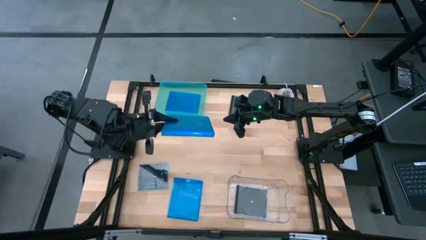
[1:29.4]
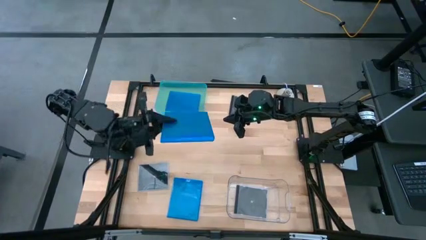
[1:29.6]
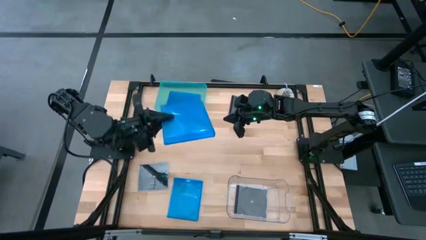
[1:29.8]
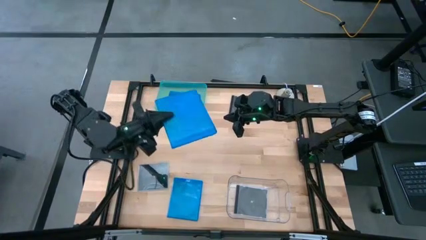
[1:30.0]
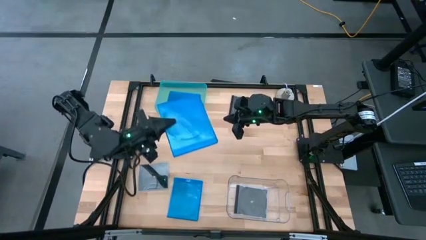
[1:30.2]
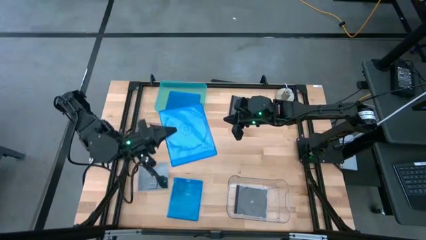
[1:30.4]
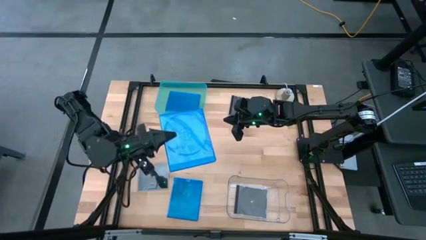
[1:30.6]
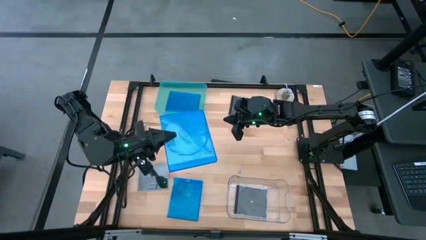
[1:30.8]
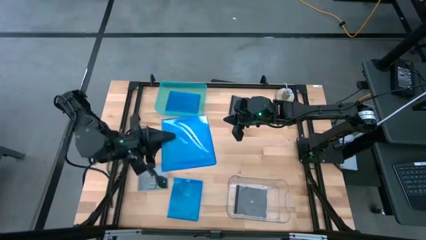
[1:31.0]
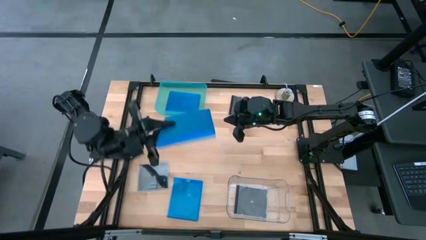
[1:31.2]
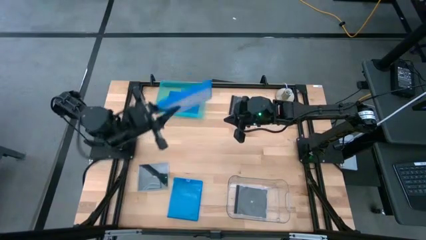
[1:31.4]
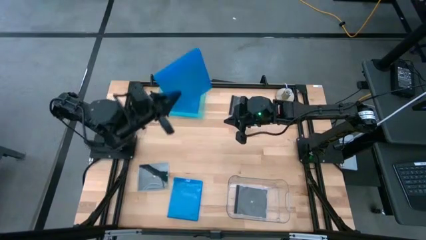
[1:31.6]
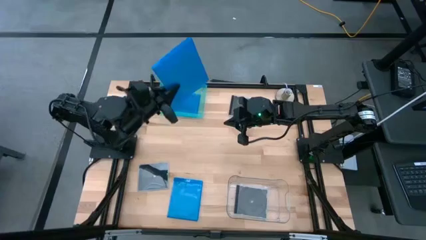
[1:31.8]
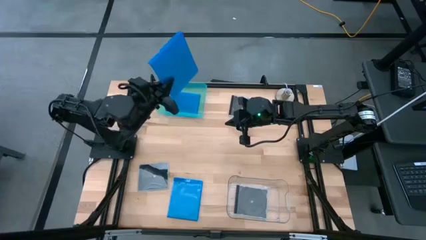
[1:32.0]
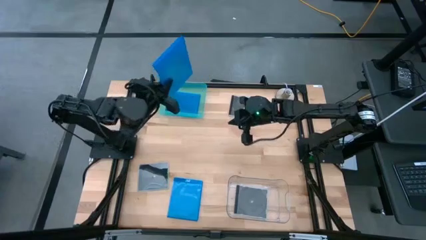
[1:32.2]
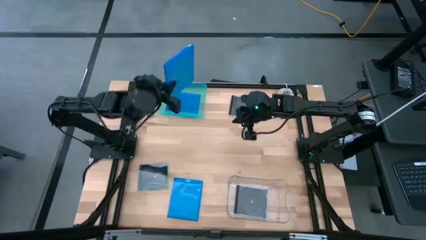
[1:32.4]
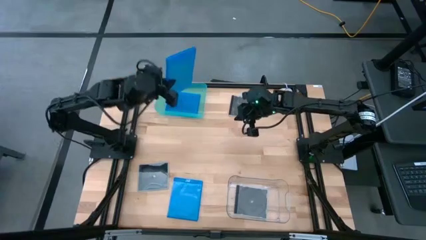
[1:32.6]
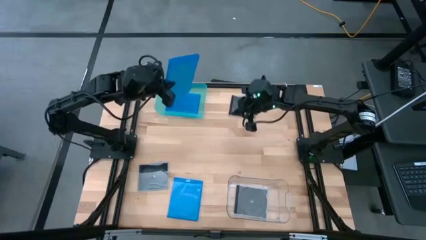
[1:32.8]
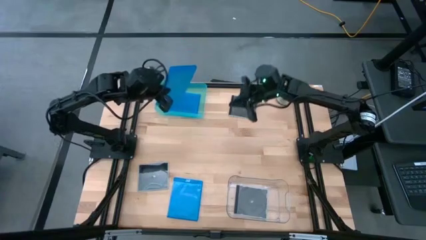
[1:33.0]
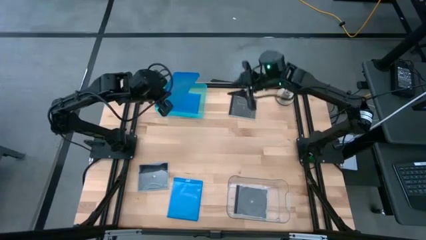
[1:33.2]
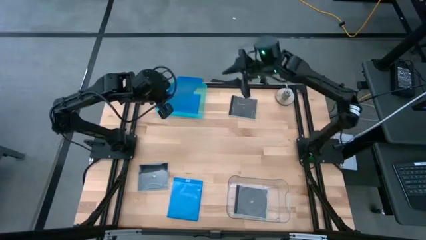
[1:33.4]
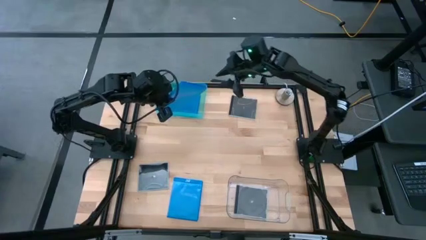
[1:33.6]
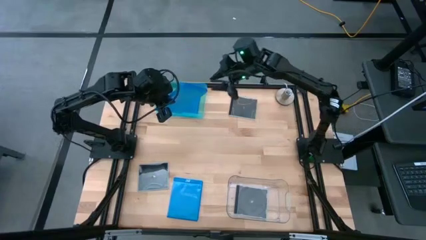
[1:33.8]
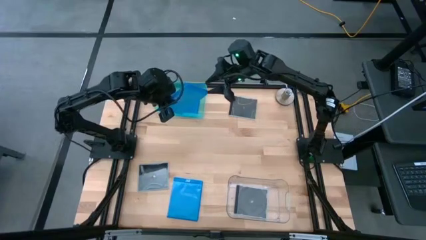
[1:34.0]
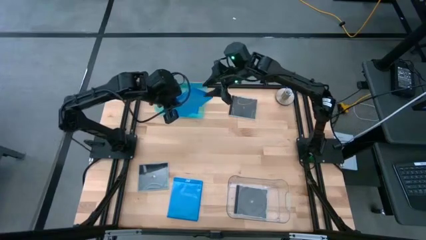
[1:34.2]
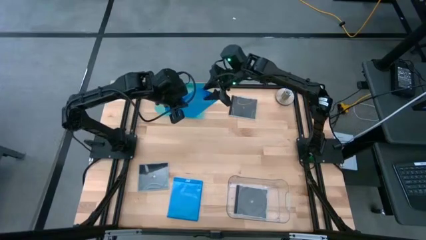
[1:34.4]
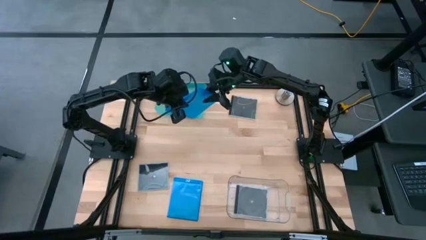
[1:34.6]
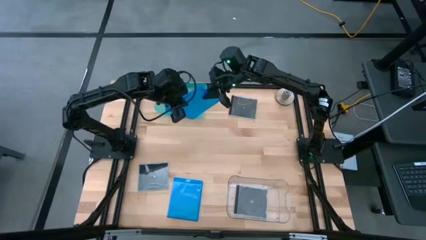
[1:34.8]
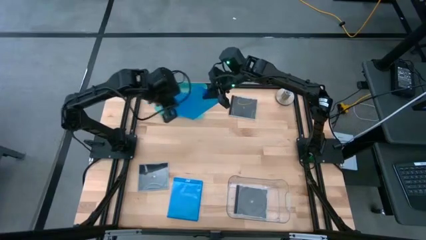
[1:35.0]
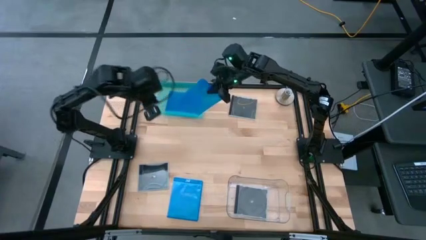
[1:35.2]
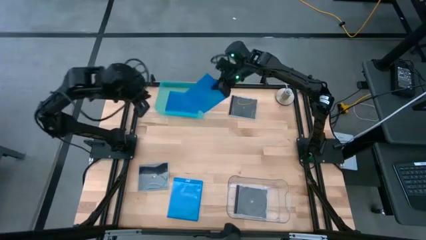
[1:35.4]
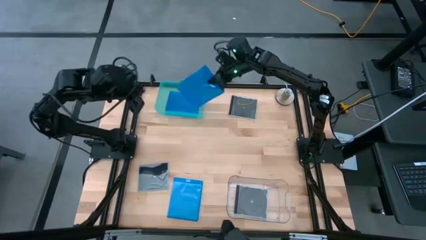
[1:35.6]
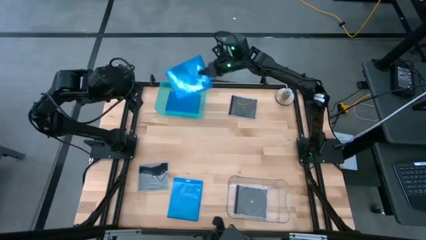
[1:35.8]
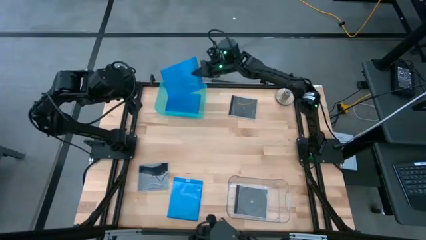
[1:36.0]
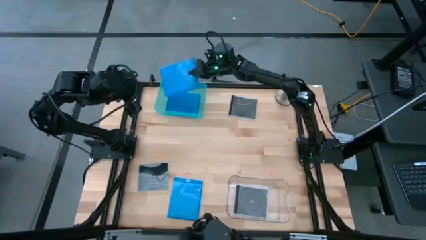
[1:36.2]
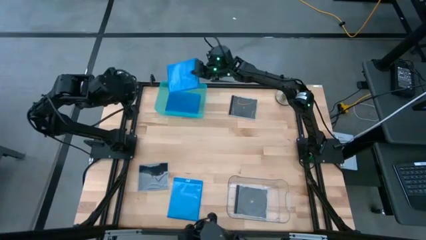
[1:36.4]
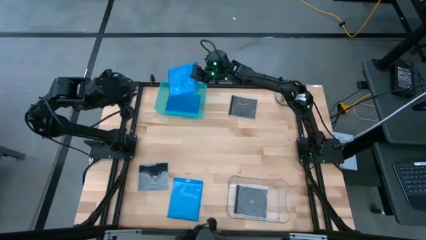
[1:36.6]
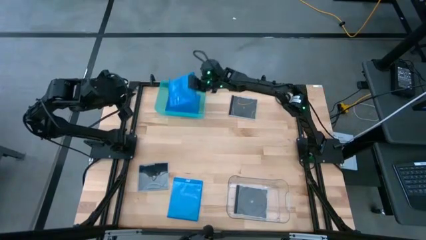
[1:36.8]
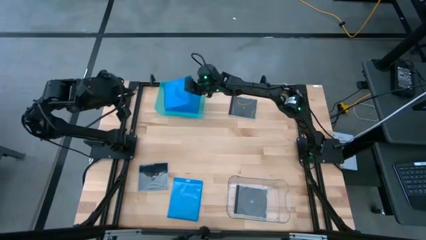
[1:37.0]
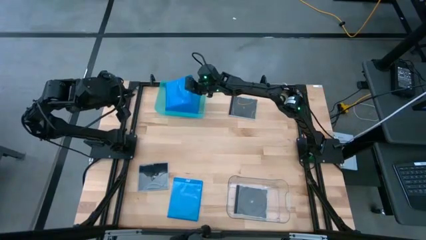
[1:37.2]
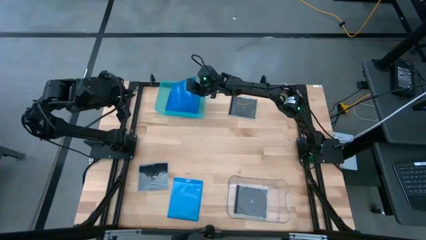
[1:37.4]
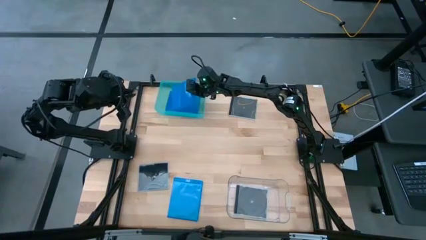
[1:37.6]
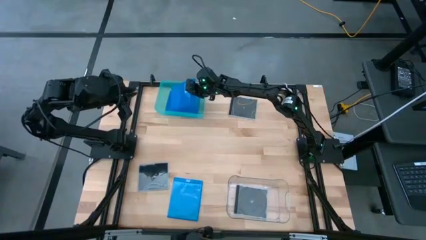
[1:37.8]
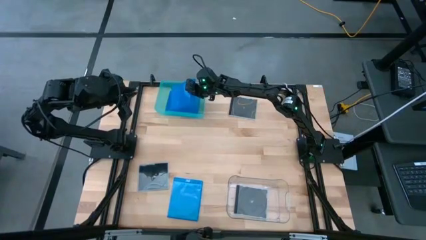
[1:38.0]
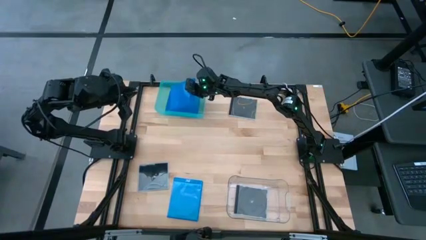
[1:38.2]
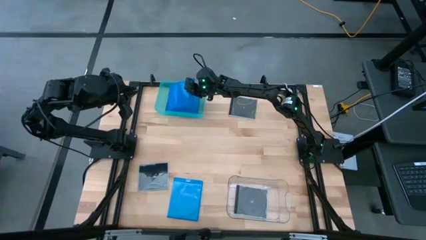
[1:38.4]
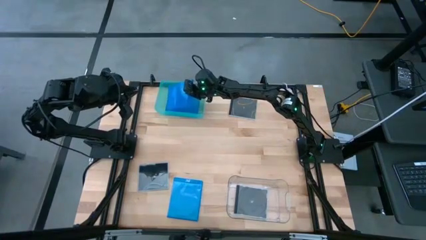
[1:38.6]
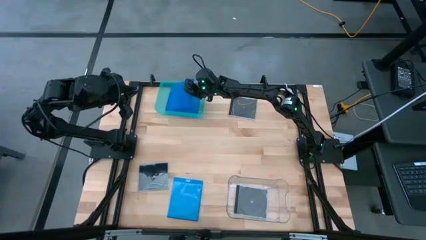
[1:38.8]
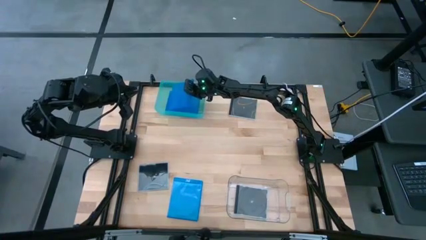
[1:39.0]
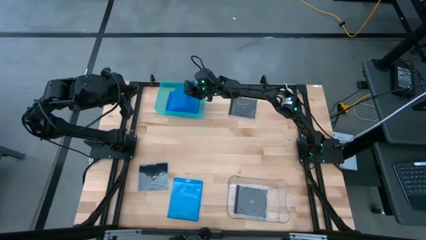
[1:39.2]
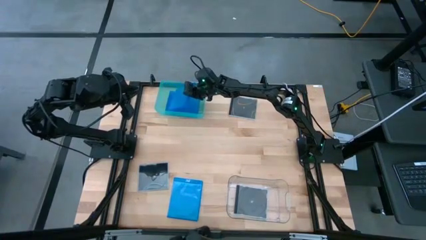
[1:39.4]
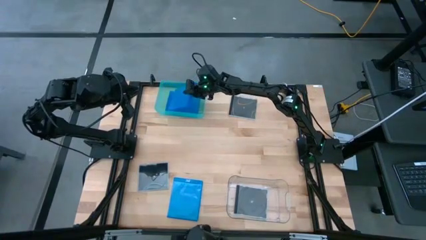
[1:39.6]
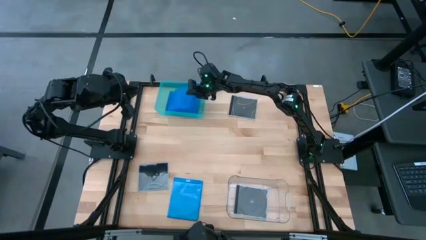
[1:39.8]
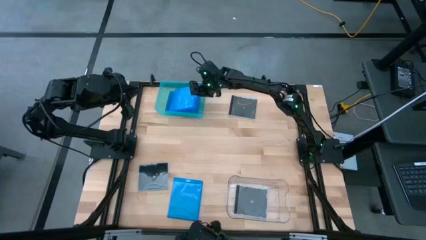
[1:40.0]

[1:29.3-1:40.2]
Task: Pick & place jewel cases by type
Put the top dark blue CD case into the light blue bin

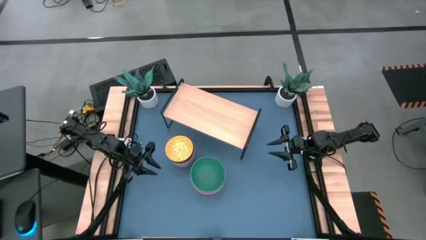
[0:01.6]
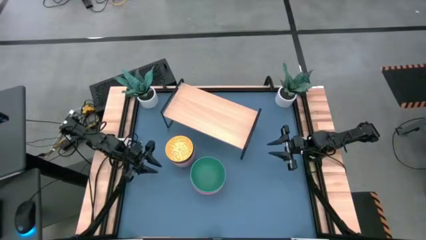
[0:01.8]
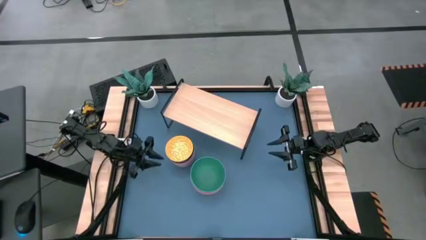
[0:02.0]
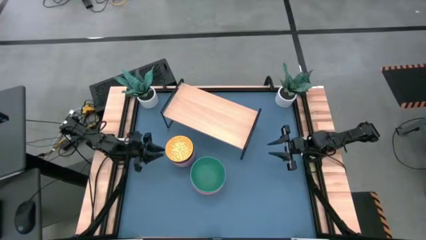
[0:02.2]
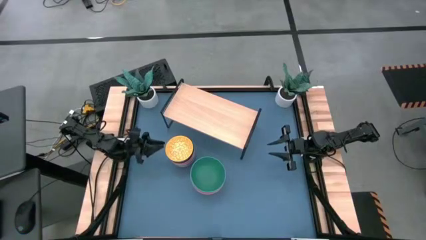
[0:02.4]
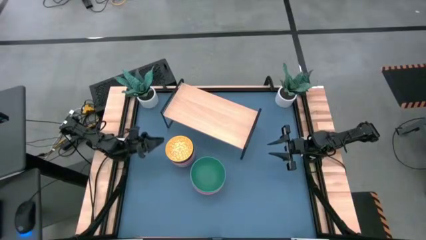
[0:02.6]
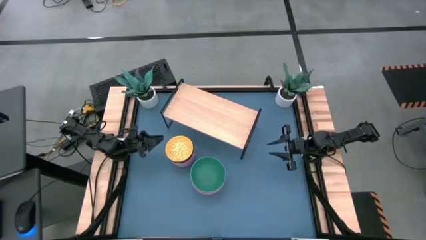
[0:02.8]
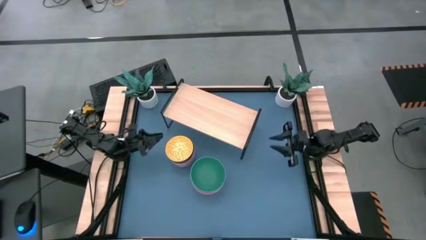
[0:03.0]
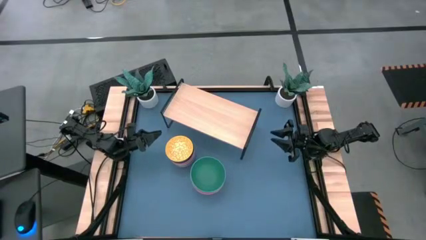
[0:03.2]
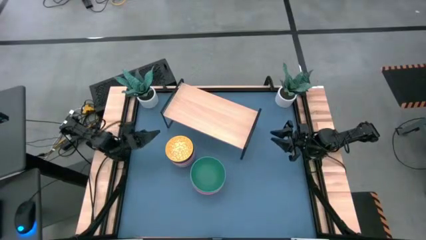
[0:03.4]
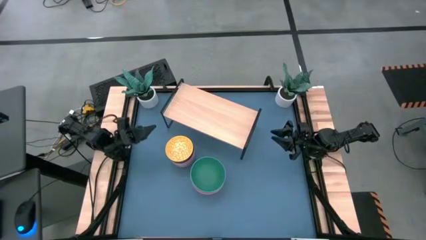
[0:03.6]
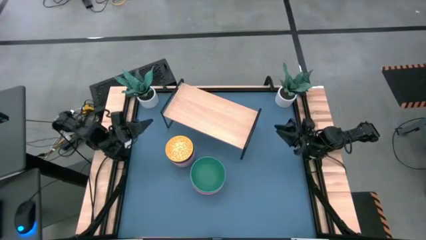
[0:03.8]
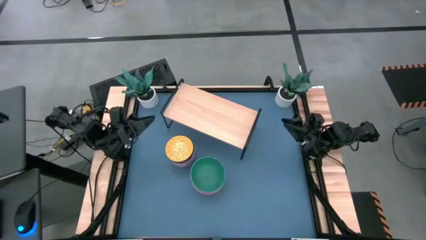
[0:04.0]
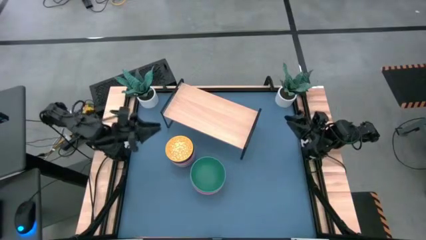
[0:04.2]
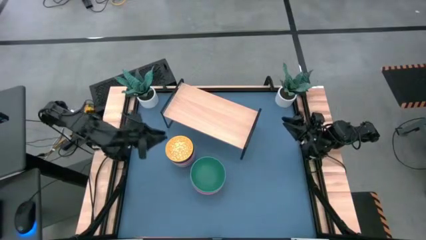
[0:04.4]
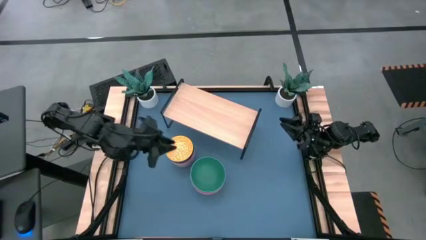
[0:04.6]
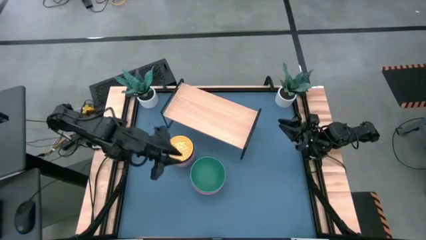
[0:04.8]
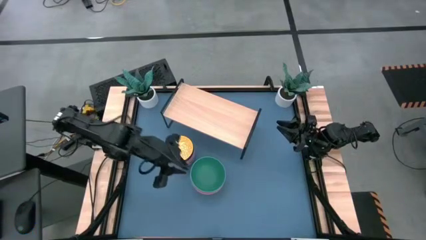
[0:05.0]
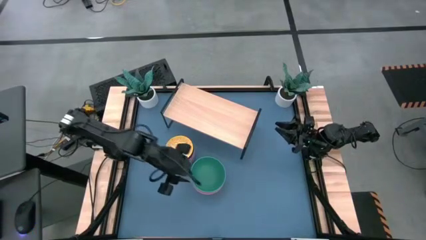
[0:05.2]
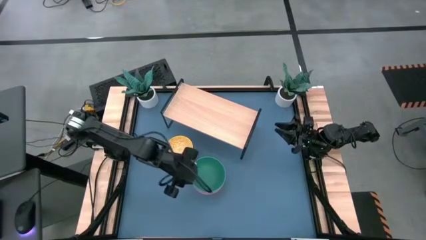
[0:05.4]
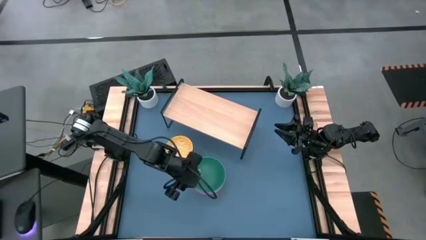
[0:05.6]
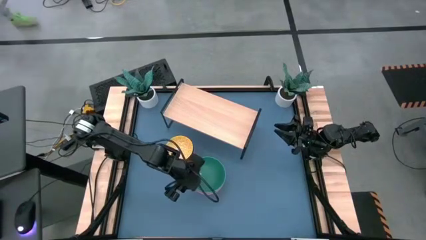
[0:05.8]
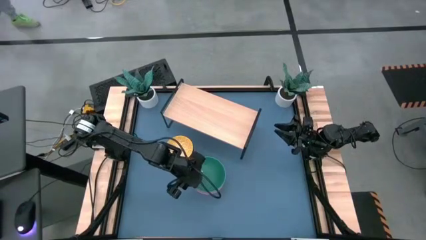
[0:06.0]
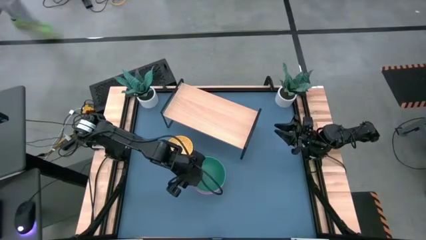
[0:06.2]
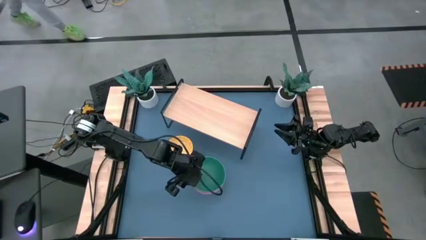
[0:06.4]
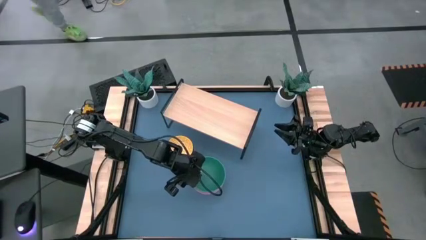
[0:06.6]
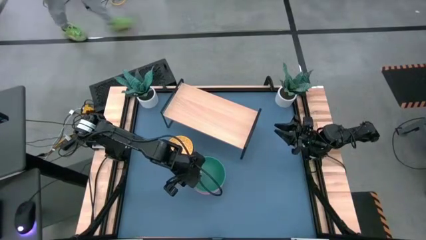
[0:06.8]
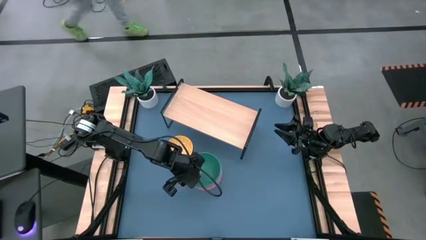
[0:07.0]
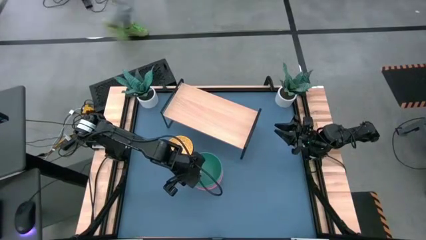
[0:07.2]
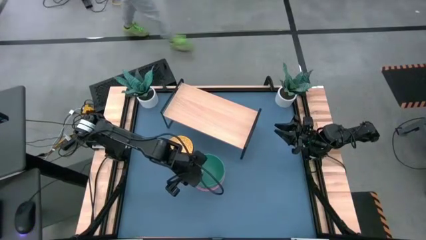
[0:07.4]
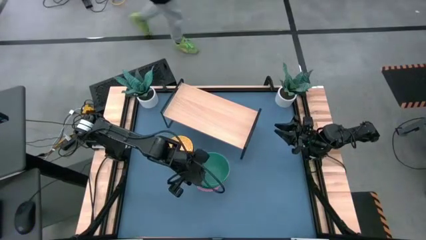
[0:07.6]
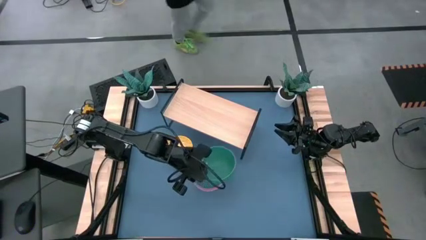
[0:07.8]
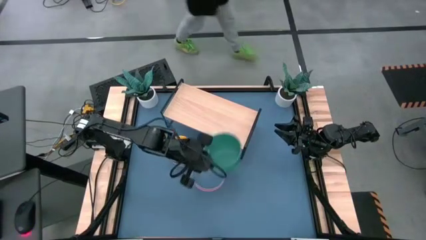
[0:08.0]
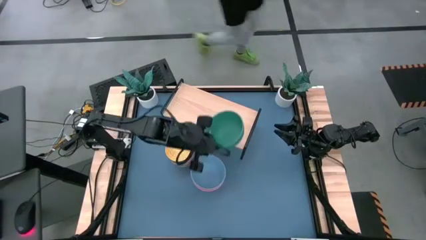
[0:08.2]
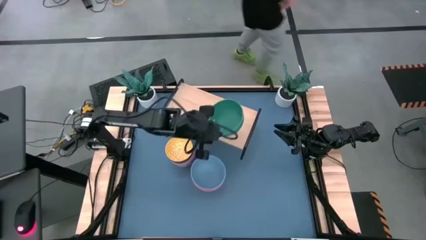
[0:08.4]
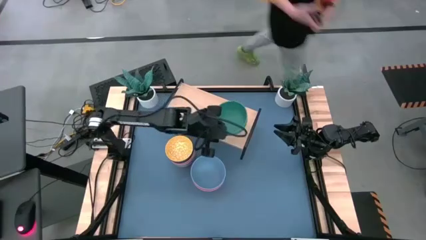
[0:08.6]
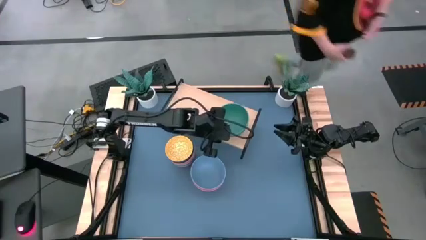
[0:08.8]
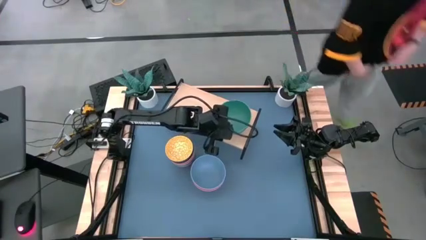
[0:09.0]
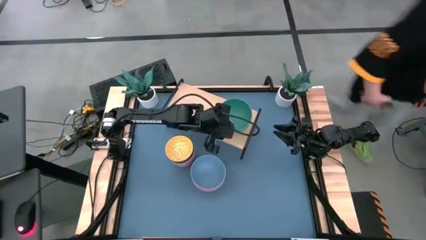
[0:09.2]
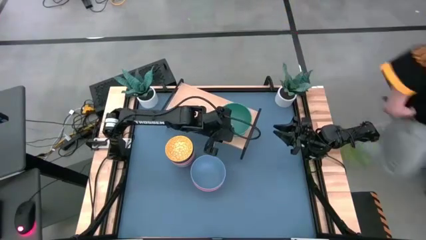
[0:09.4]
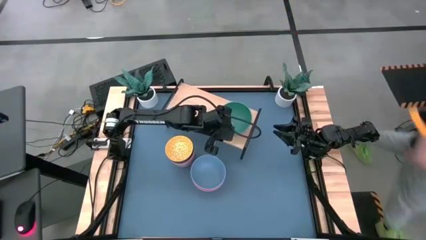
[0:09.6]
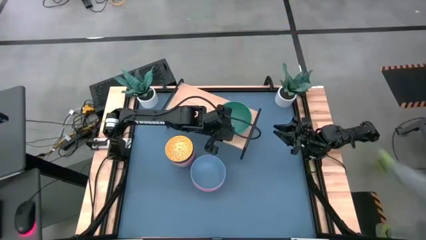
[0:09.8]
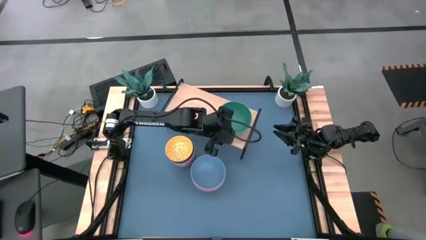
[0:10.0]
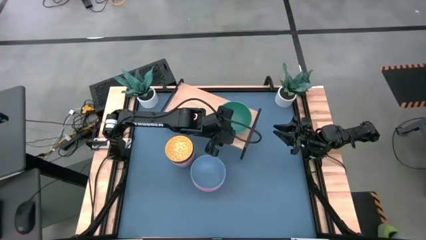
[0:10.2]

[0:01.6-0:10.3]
Task: Place and stack bowls onto a shelf
Put the green bowl on the shelf
